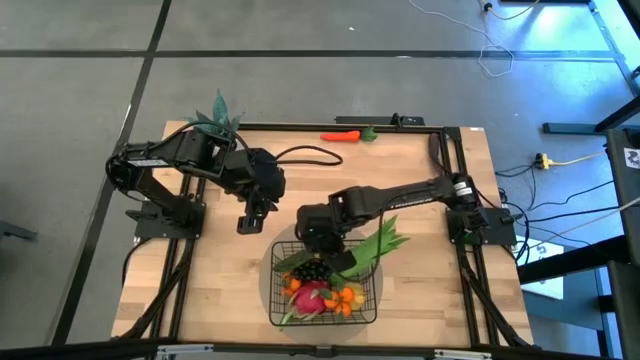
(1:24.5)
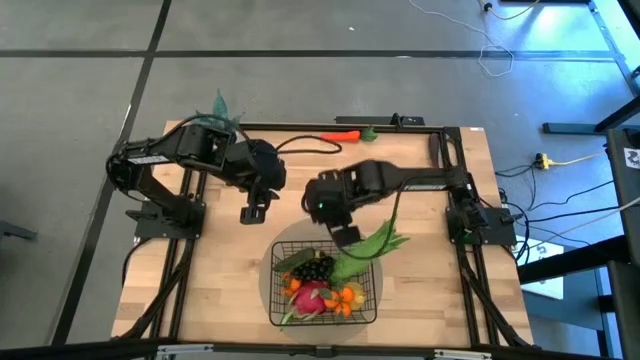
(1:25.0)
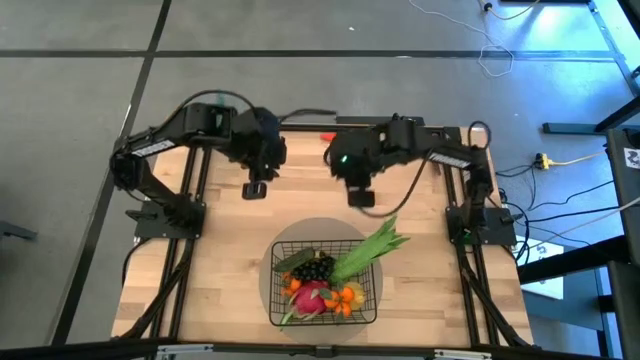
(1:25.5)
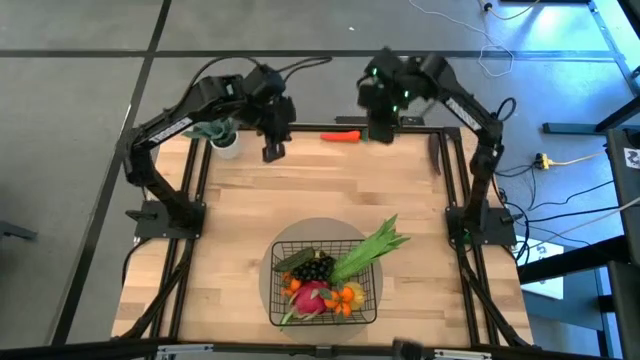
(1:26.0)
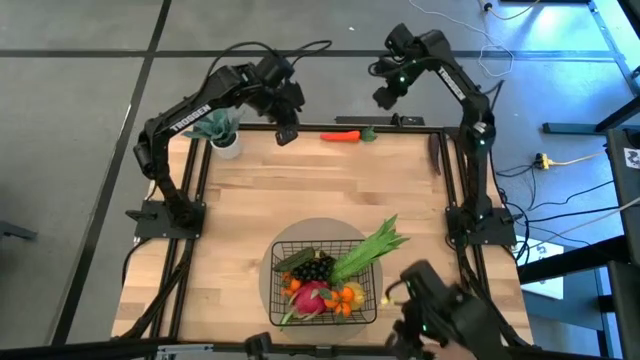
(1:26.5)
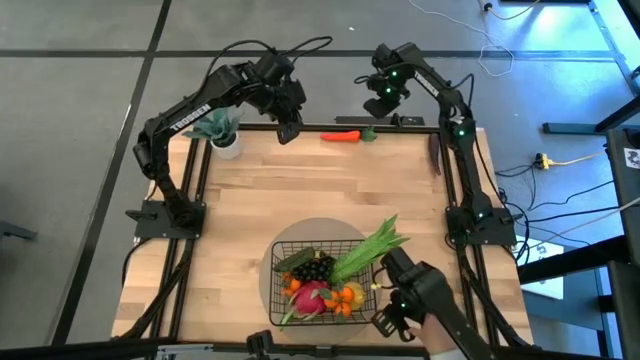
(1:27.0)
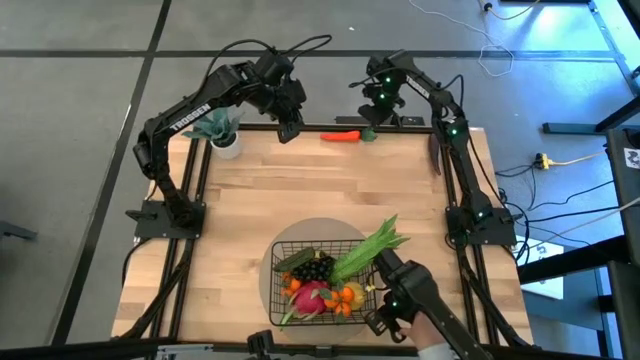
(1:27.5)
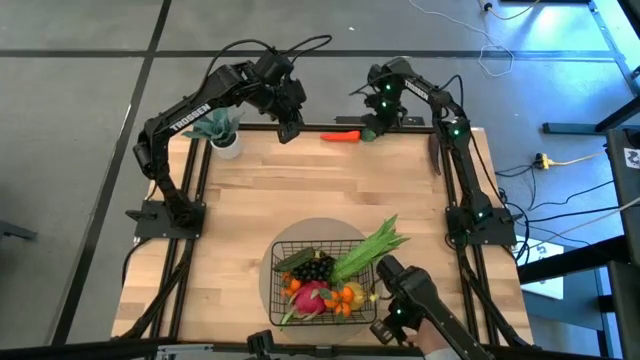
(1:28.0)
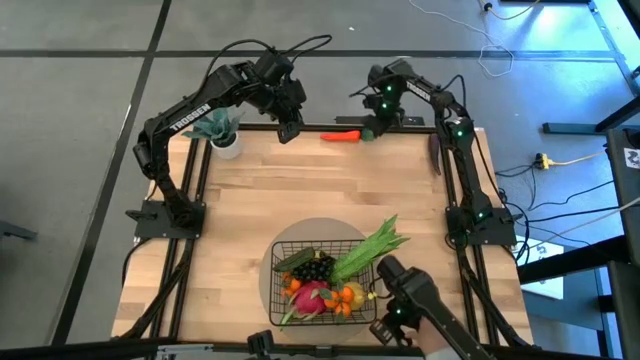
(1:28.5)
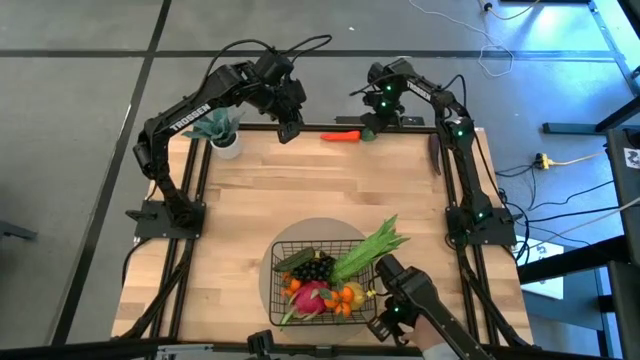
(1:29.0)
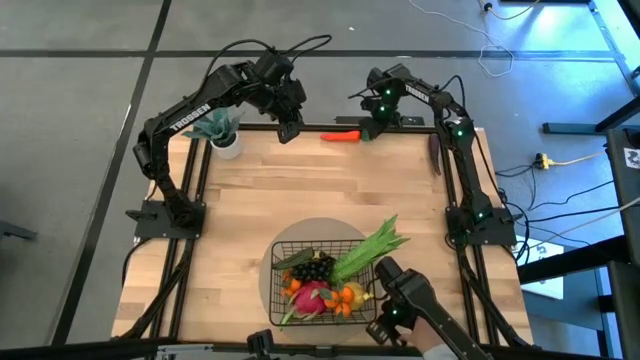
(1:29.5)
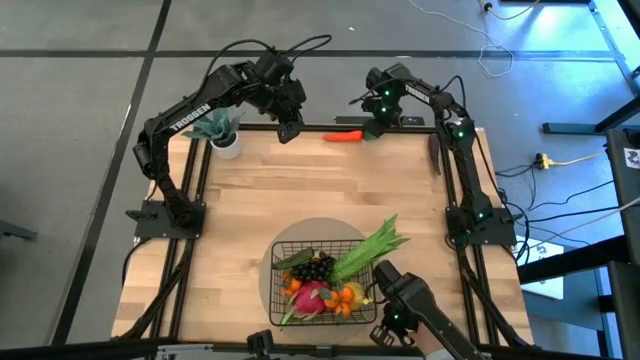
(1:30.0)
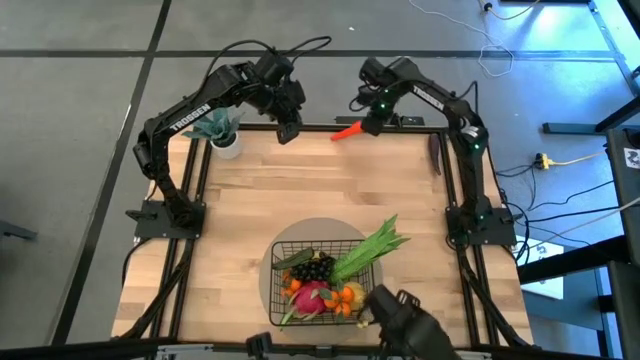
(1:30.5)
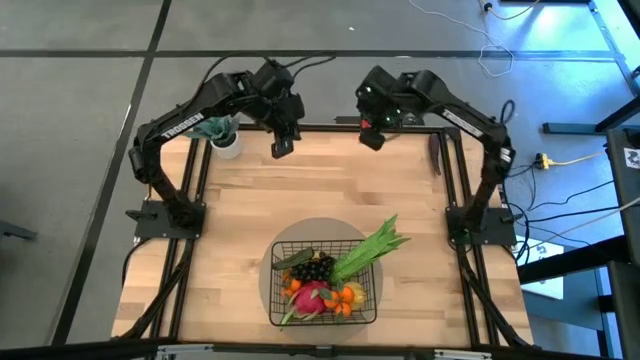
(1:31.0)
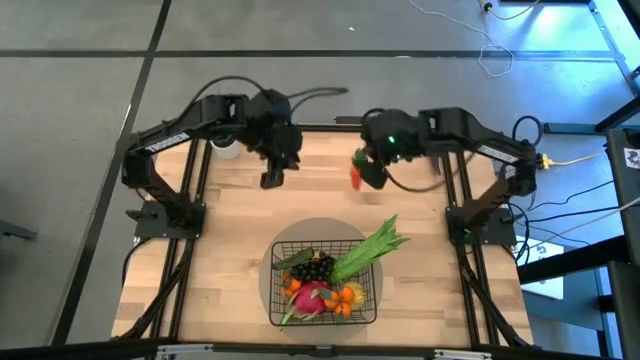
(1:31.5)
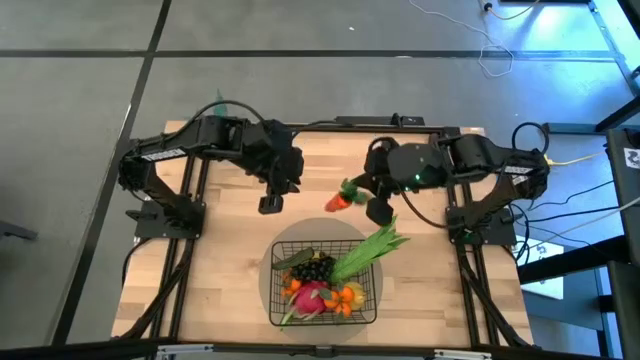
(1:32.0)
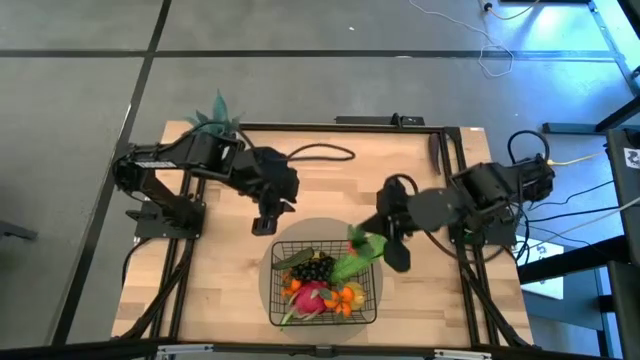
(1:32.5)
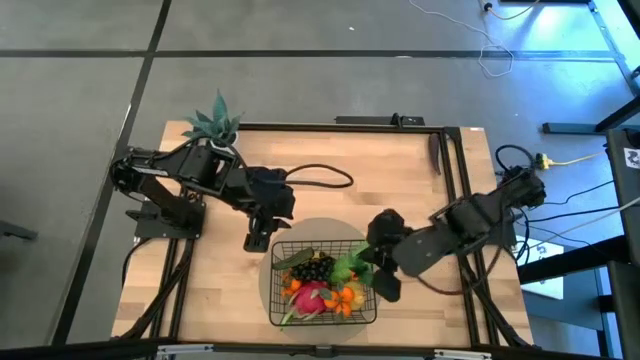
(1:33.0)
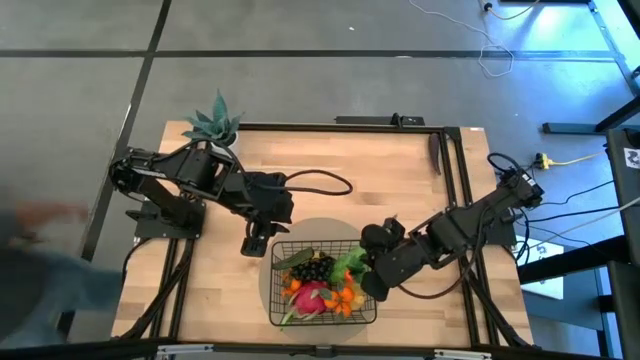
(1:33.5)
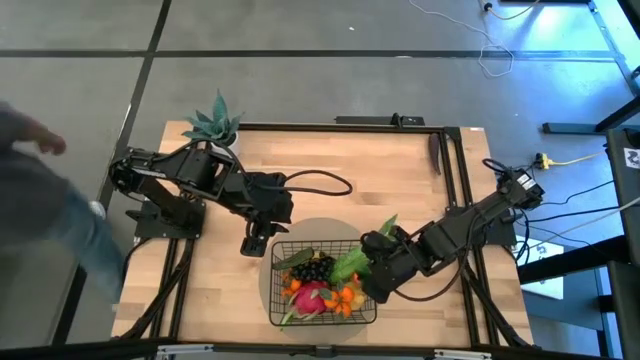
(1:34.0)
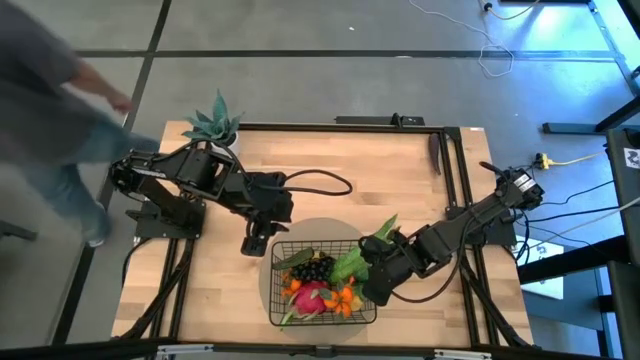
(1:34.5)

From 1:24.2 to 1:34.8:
Task: Build produce basket
Put the carrot into the black mesh basket

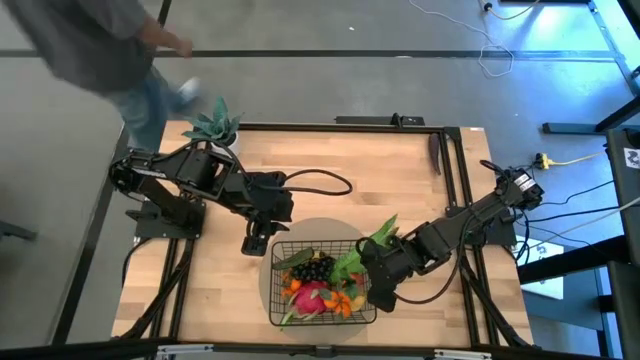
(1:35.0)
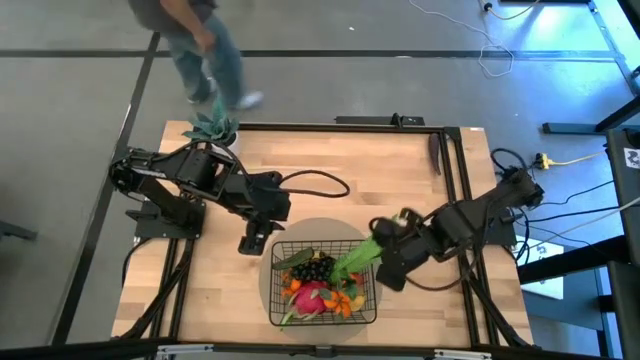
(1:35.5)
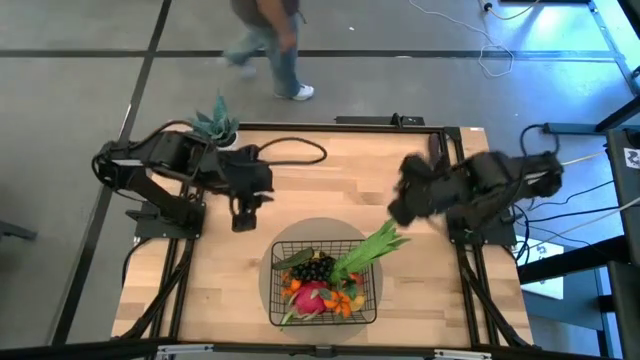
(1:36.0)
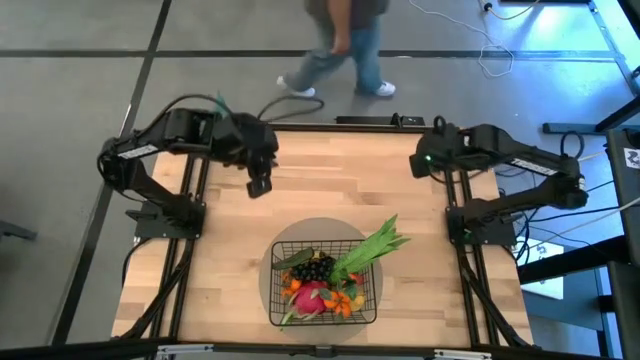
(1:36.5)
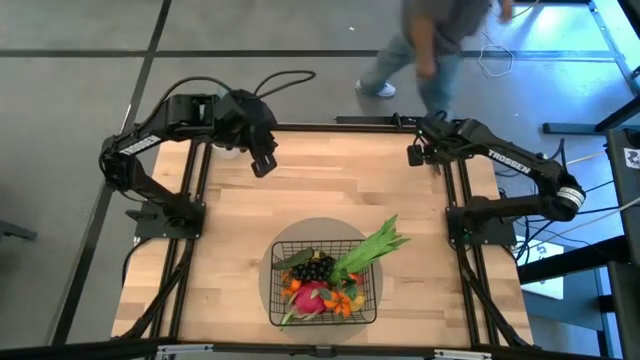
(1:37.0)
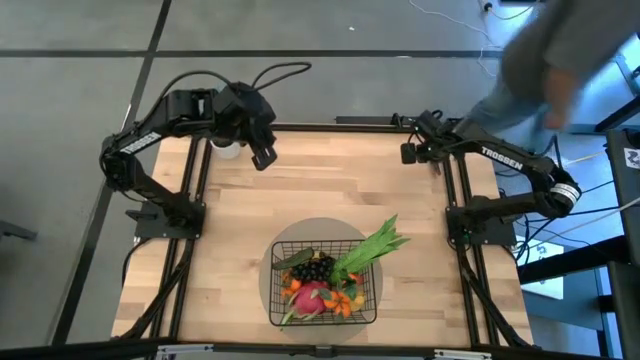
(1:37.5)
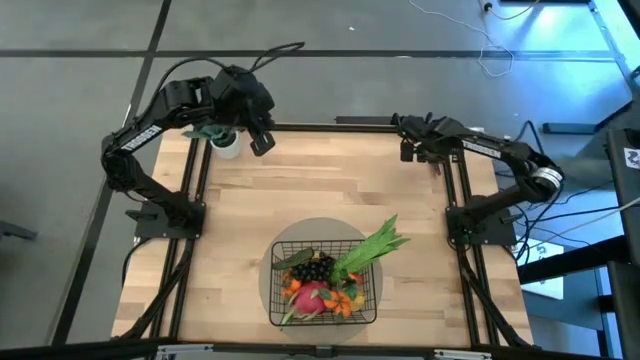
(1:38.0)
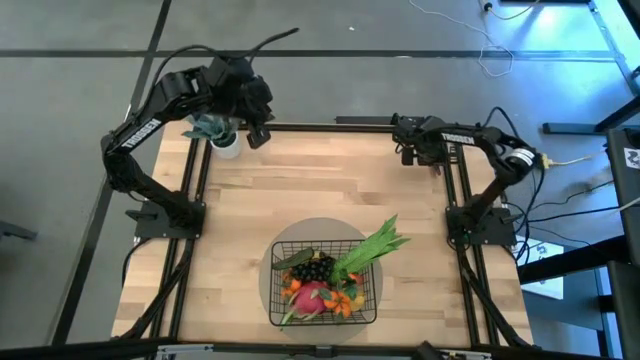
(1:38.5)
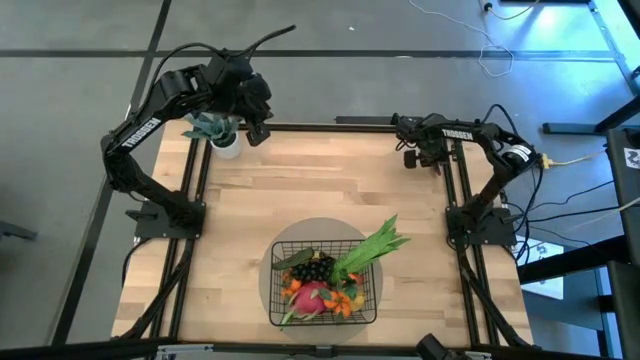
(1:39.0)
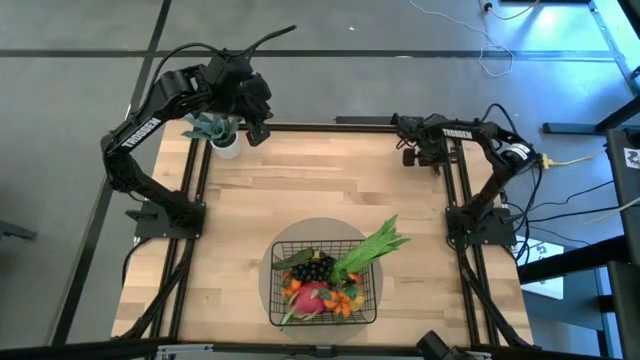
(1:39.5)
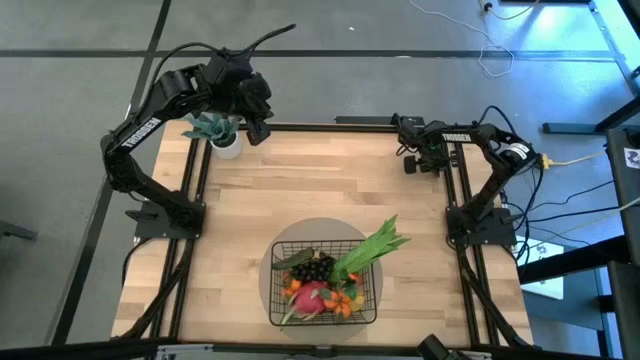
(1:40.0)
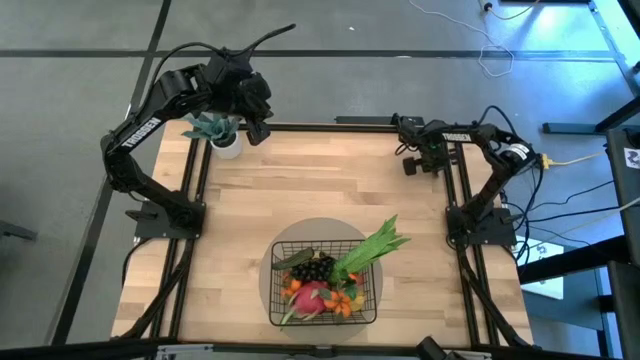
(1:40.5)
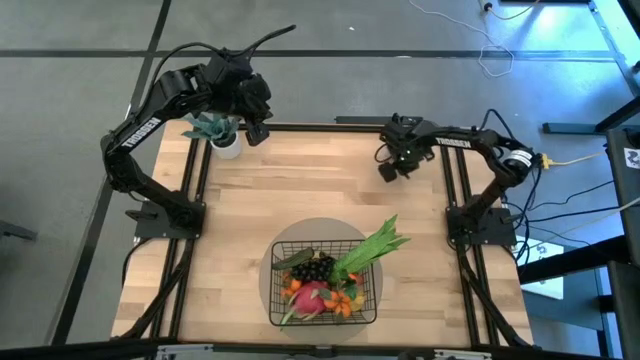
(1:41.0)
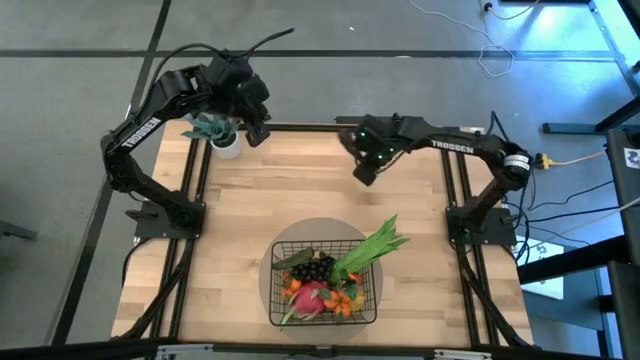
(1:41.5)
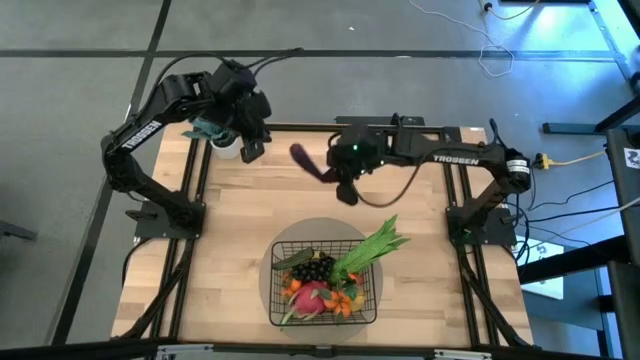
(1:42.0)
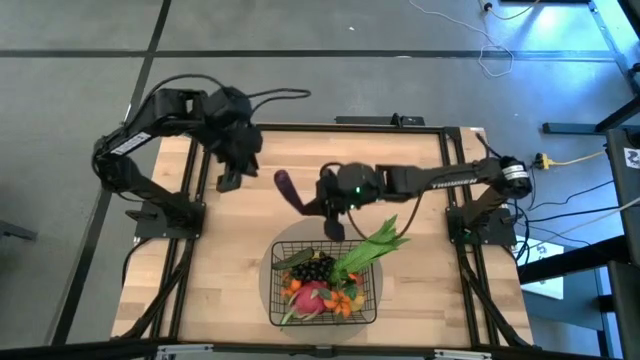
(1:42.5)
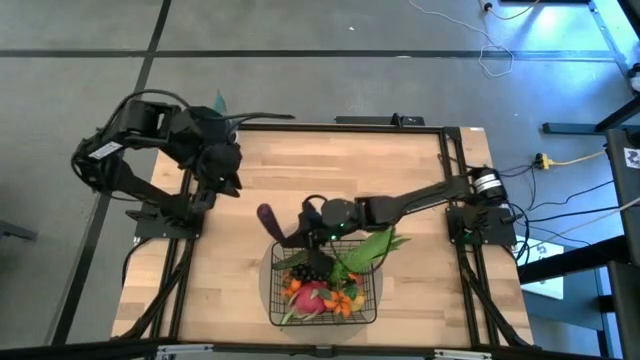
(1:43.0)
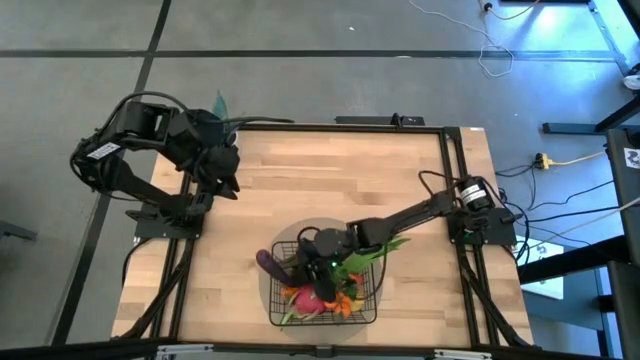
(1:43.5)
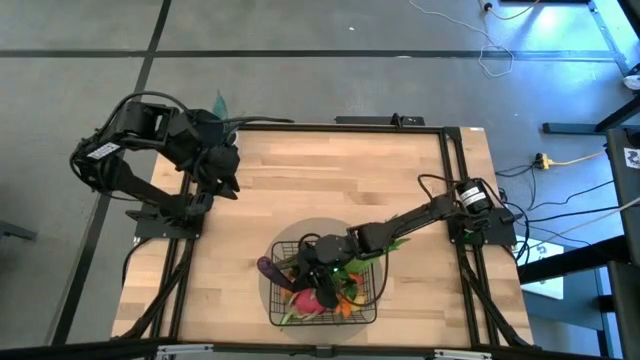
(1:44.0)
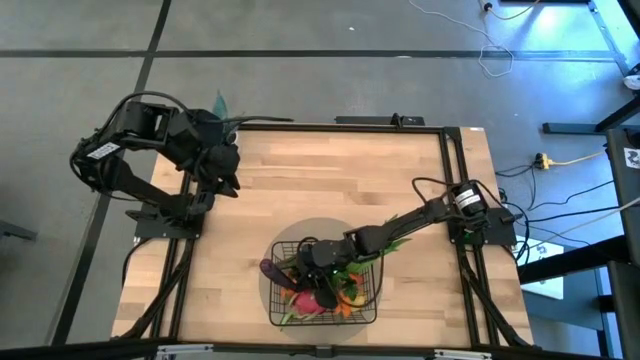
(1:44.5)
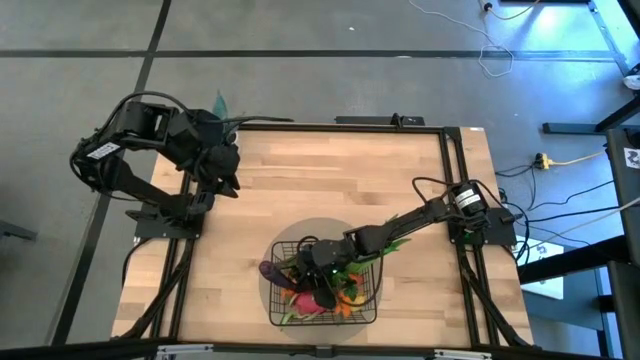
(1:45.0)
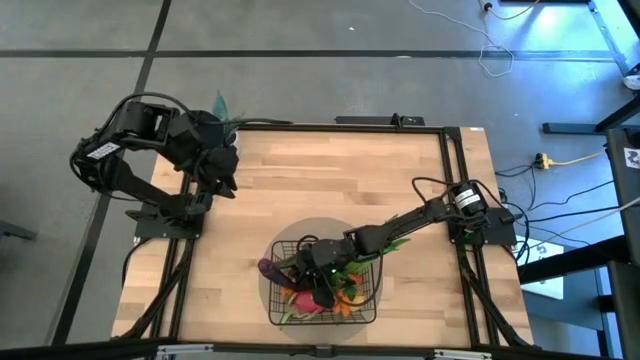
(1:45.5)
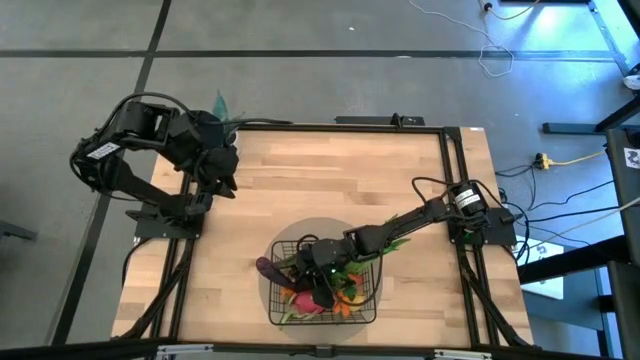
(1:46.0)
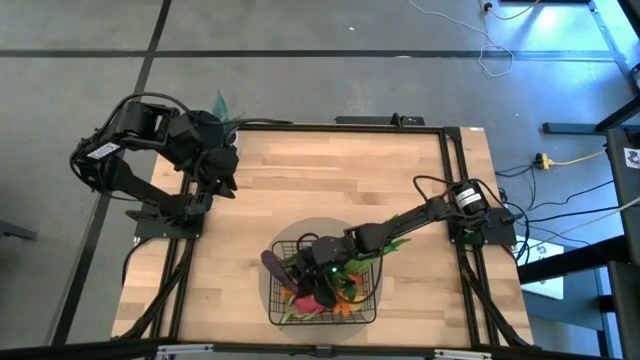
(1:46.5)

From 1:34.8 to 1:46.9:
Put the eggplant into the black mesh basket
